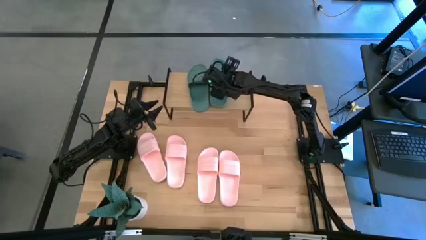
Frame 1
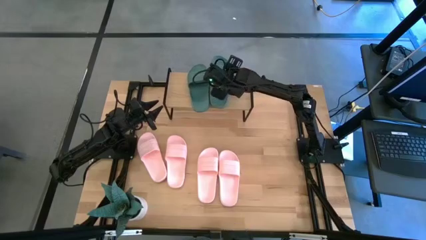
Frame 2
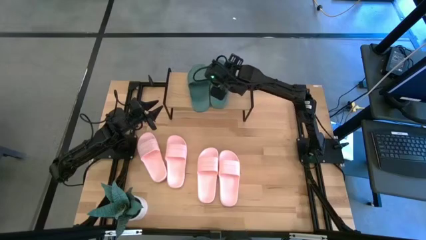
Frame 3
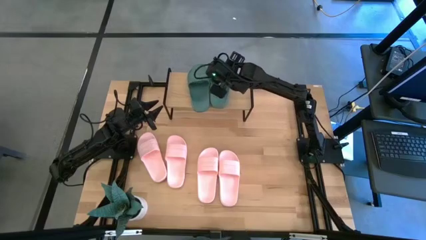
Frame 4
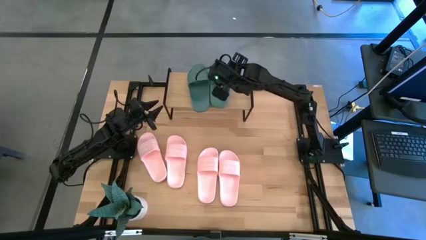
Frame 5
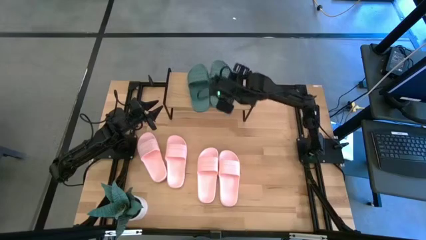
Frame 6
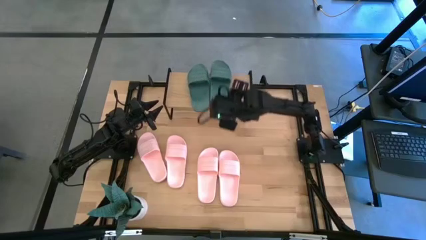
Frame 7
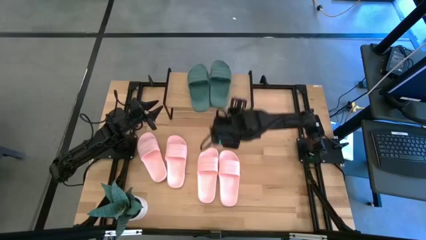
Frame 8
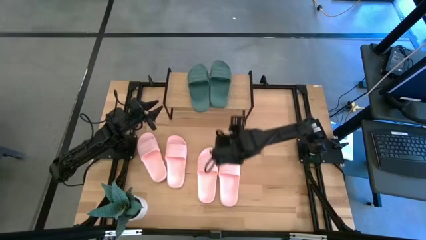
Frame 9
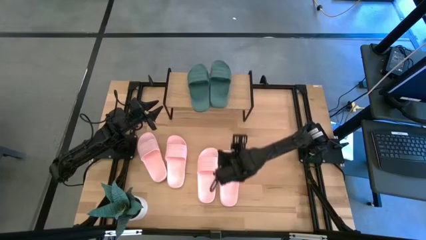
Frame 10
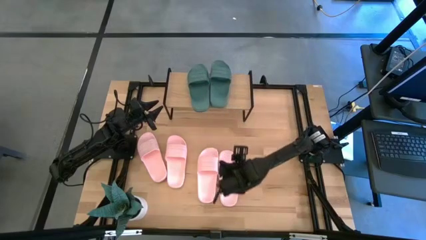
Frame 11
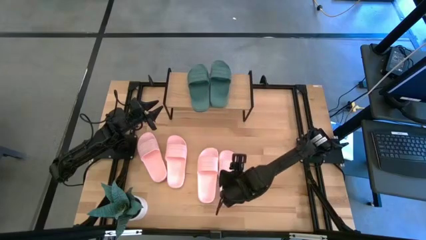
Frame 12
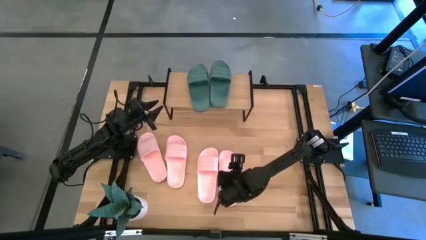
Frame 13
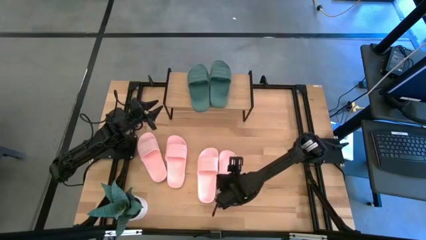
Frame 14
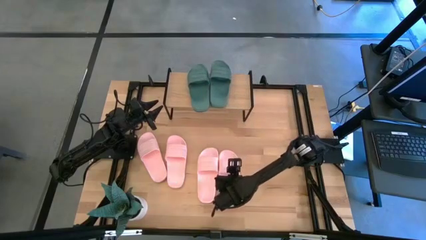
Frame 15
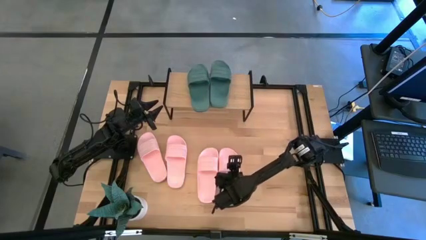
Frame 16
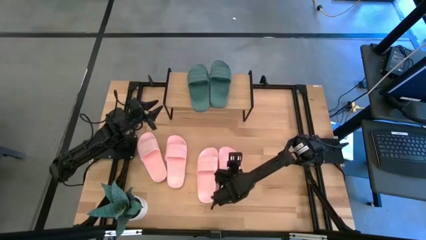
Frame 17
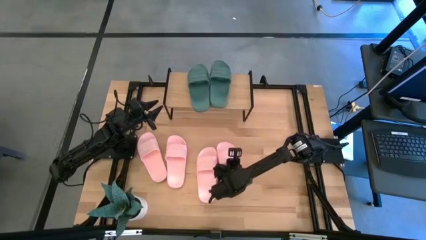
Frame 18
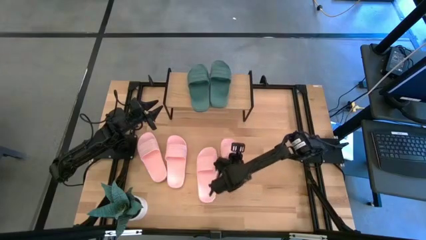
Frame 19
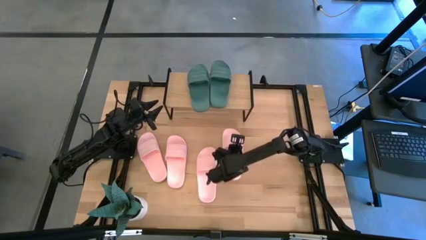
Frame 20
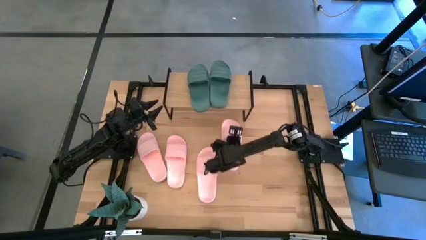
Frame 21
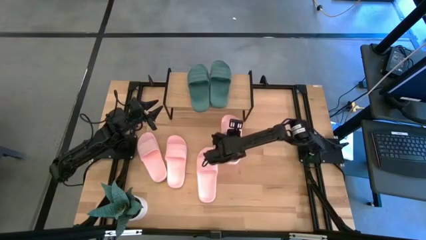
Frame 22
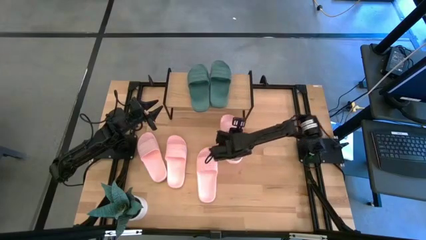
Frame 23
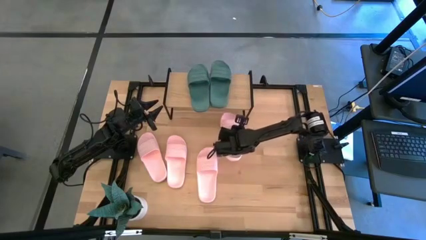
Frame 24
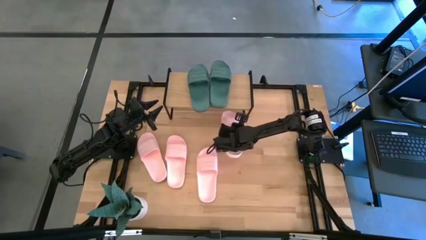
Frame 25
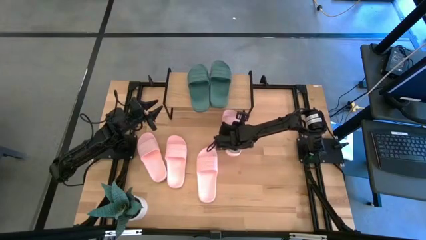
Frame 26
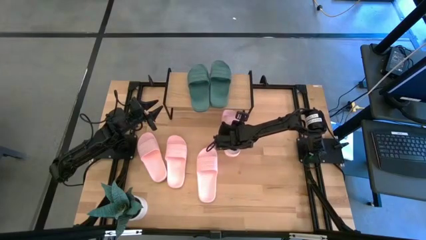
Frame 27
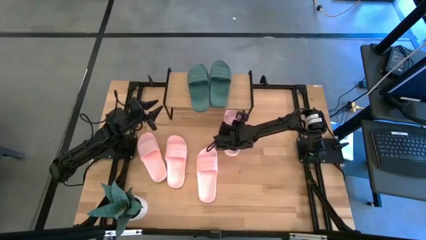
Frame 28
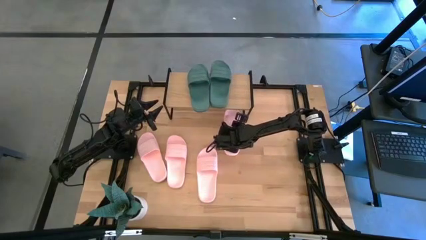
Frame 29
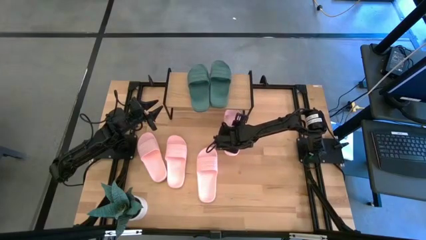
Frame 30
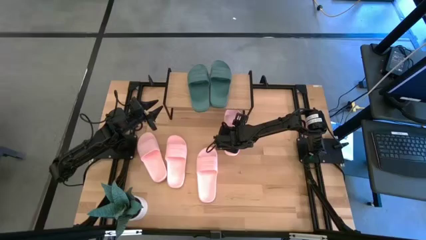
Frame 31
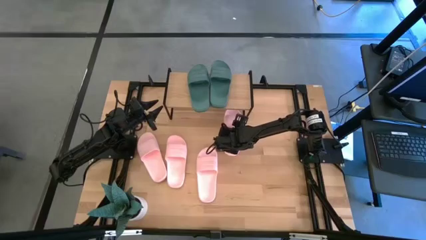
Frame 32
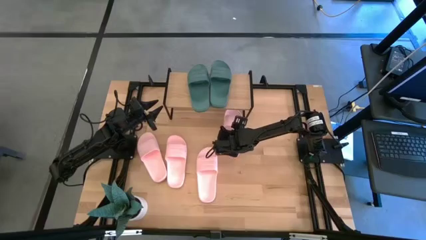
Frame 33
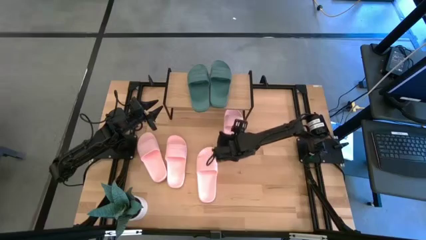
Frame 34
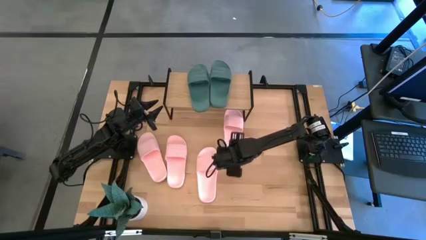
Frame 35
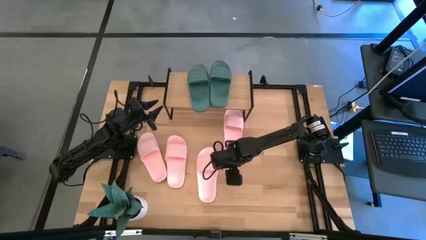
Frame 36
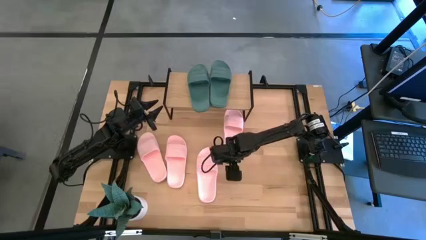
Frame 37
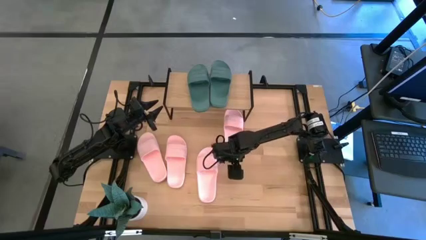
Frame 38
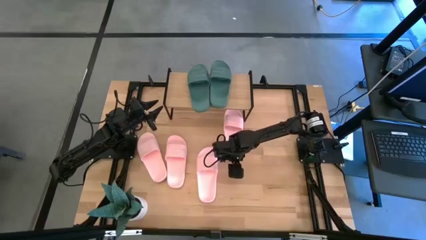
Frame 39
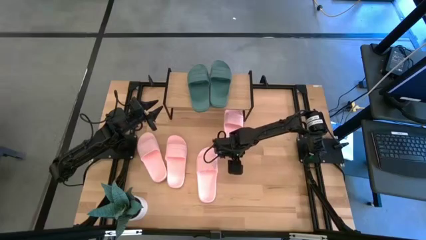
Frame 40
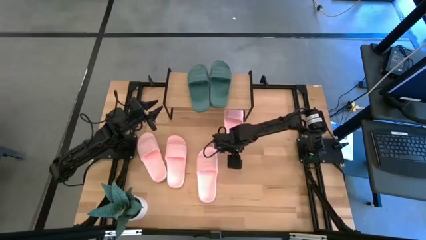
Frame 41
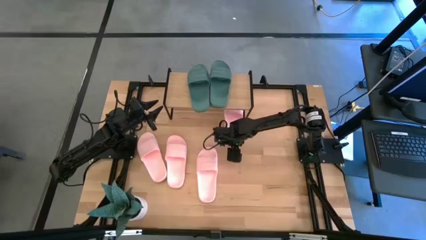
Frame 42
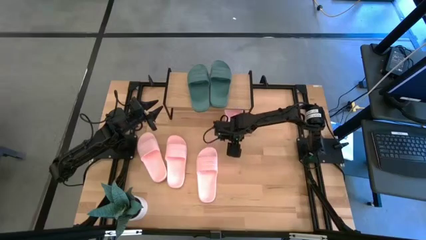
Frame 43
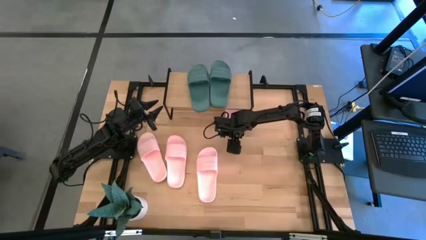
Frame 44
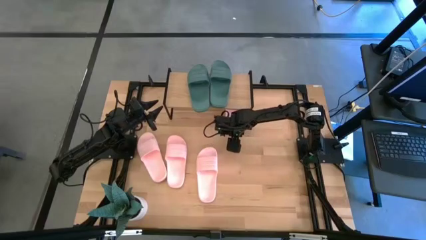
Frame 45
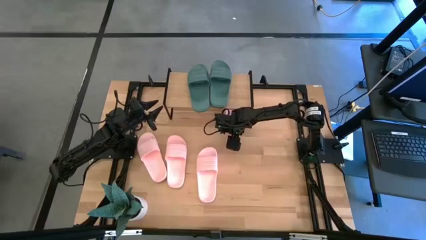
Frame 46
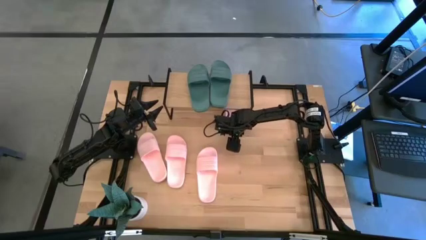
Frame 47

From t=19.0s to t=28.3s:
Task: Pick and place slides into the shelf
Put the pink slipper under the shelf

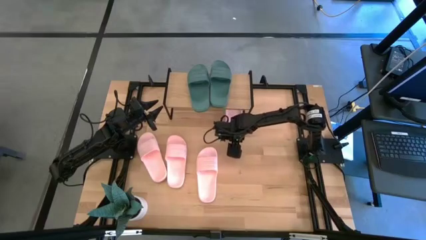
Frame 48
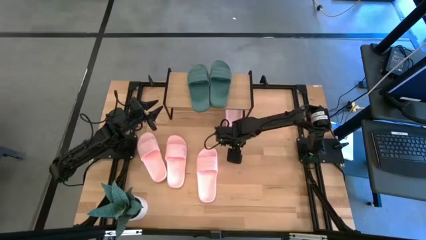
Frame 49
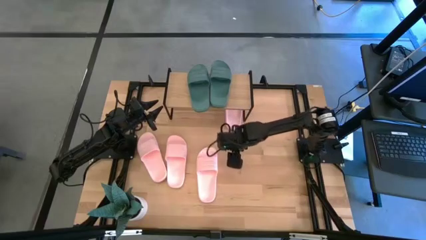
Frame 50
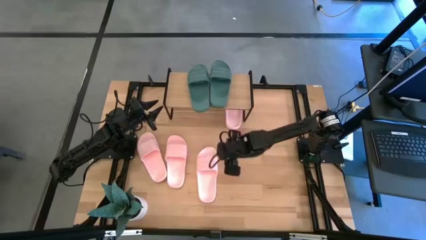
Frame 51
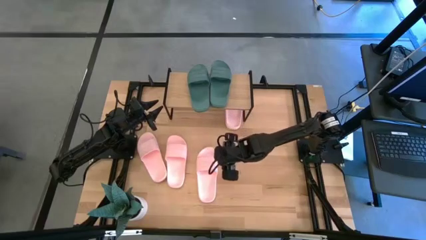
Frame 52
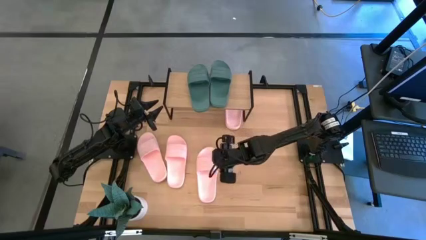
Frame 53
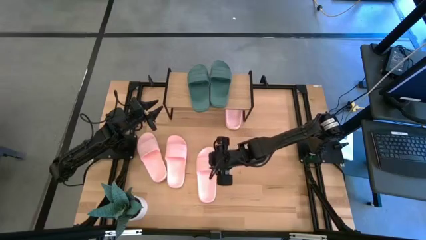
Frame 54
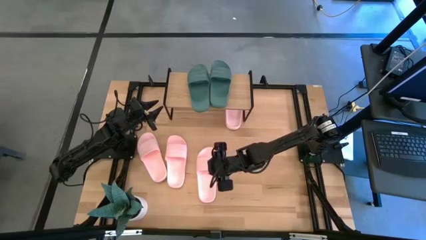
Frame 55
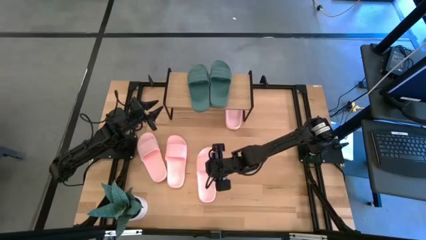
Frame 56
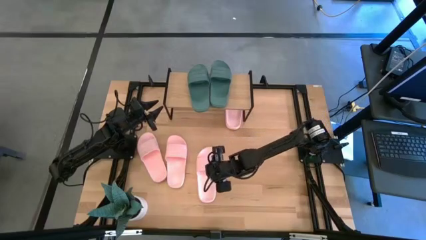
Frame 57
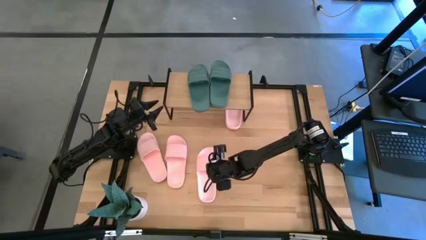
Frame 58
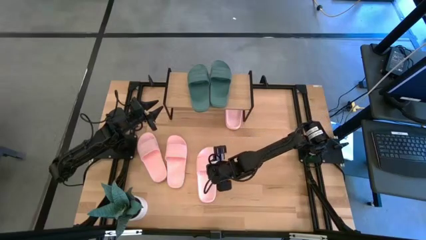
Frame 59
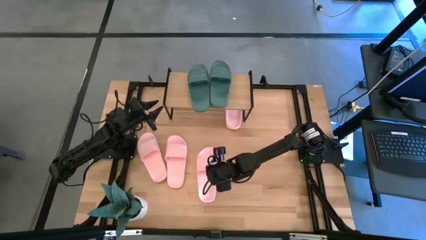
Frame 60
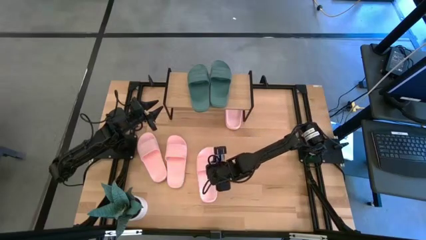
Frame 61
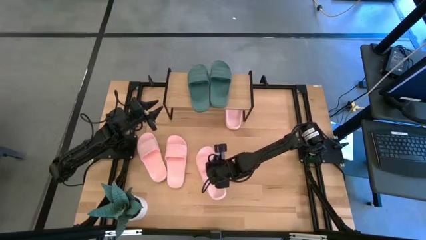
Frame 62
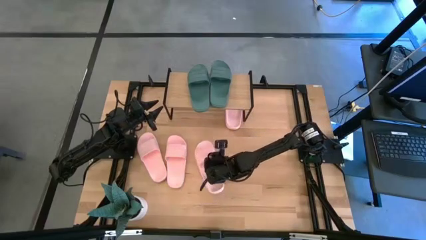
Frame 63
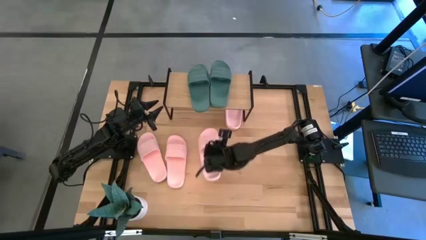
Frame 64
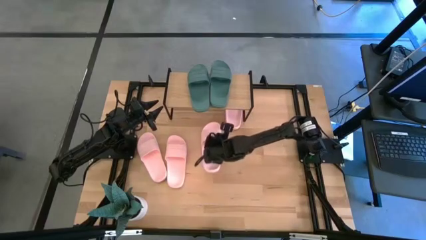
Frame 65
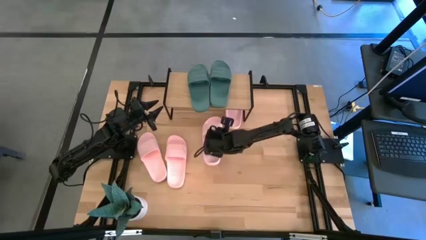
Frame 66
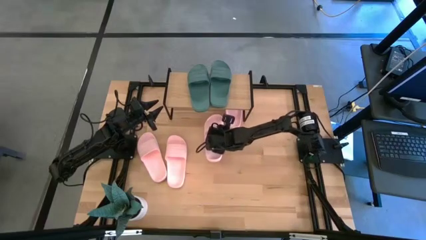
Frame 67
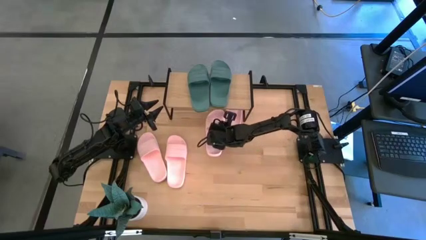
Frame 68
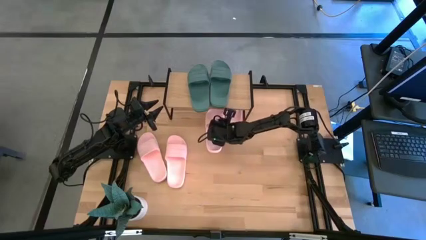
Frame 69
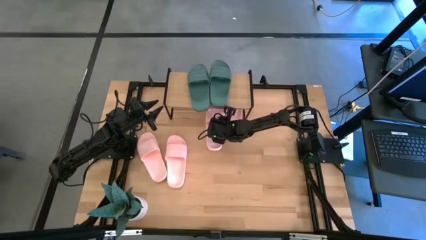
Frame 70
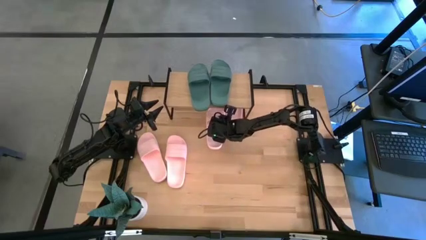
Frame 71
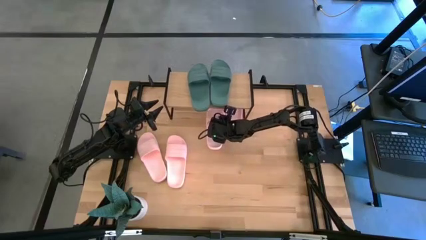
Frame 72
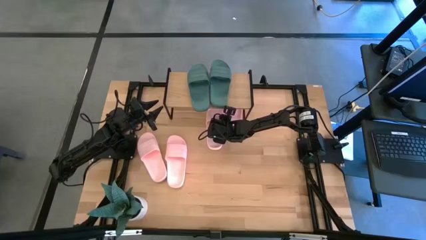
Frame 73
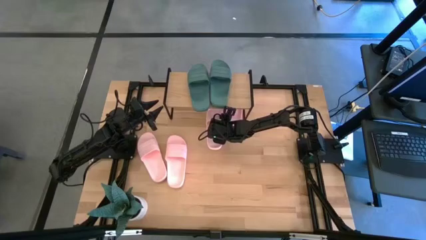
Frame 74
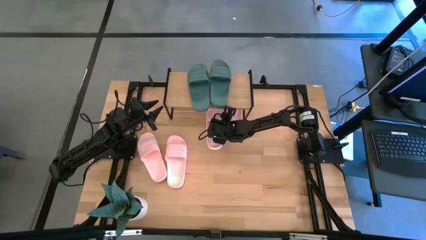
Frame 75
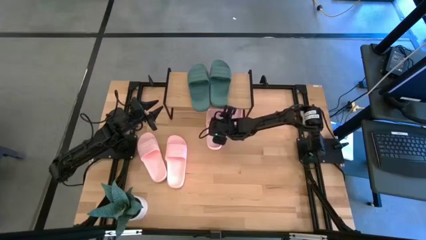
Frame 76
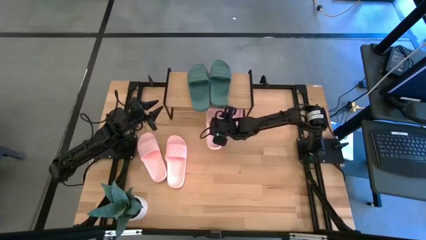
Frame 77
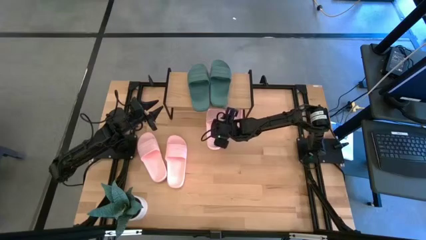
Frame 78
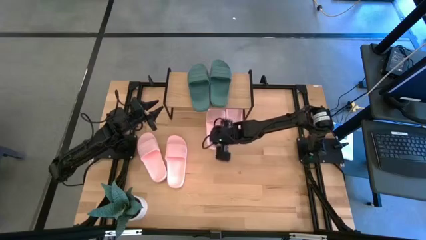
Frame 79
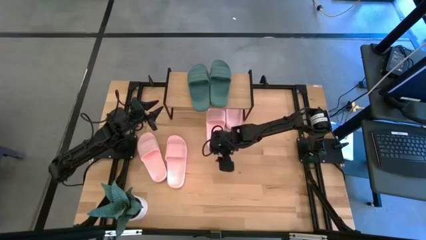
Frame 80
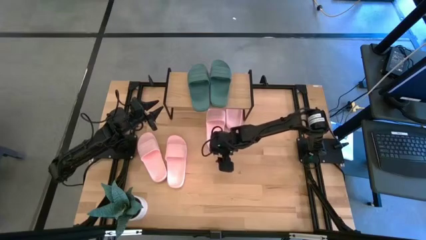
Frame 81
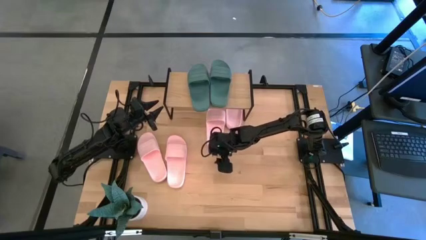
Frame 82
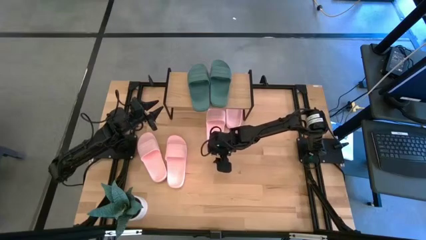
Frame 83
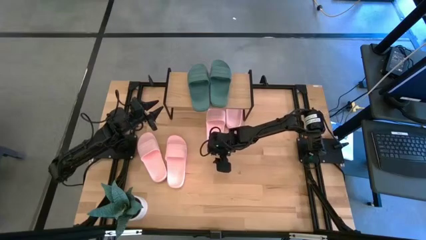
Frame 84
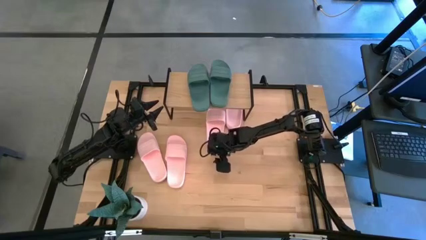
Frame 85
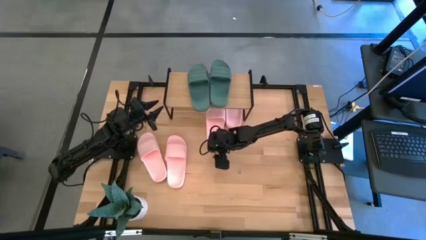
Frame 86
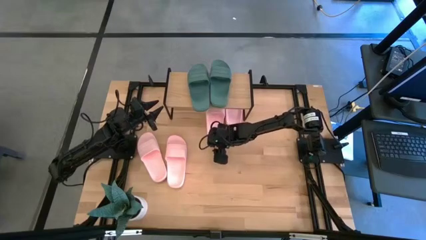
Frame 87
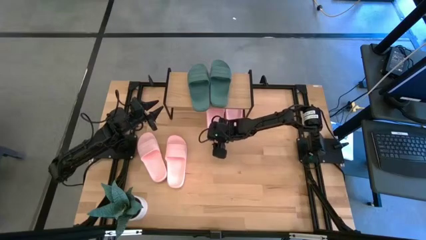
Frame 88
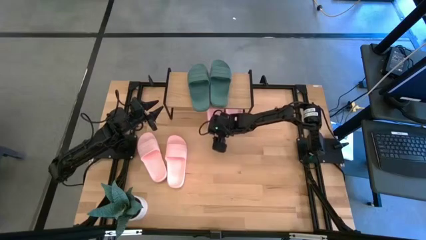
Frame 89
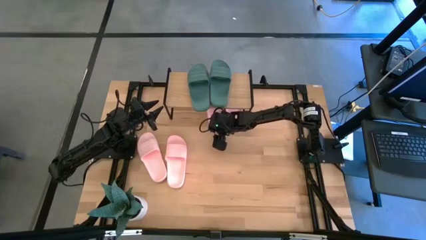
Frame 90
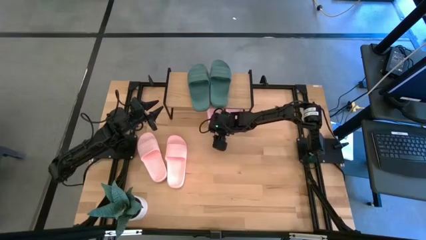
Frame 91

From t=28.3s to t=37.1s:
Put the pink slipper under the shelf
